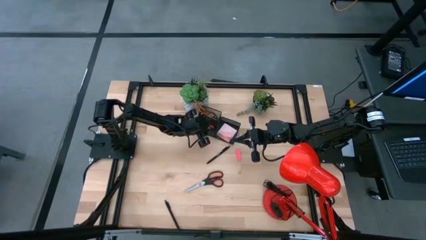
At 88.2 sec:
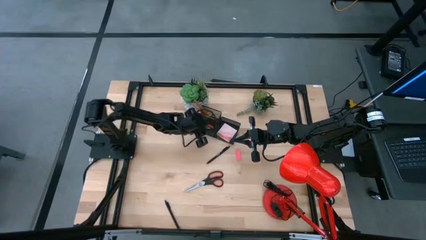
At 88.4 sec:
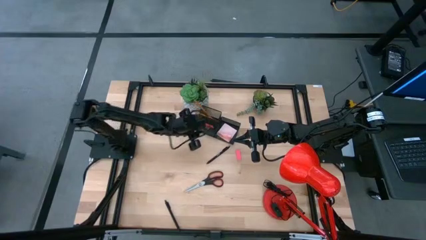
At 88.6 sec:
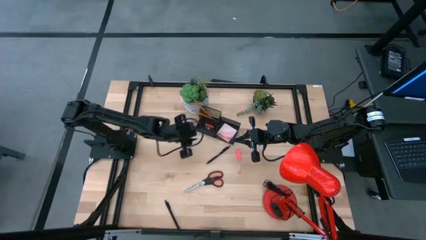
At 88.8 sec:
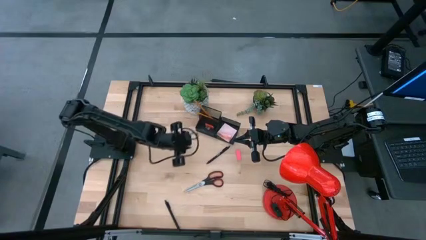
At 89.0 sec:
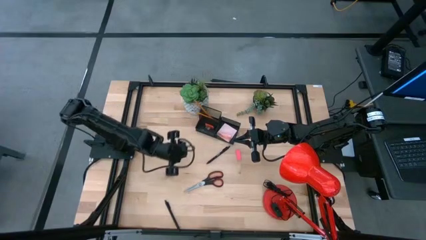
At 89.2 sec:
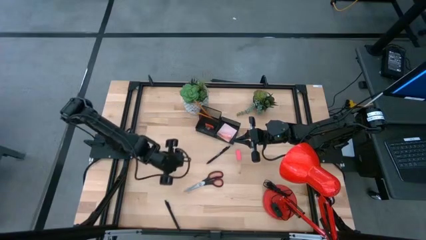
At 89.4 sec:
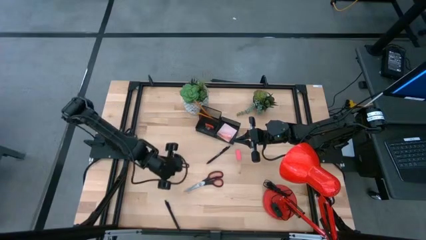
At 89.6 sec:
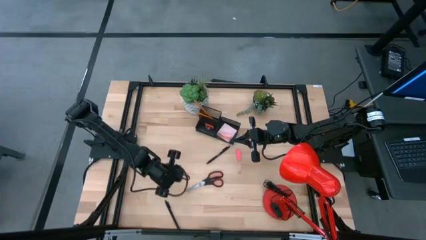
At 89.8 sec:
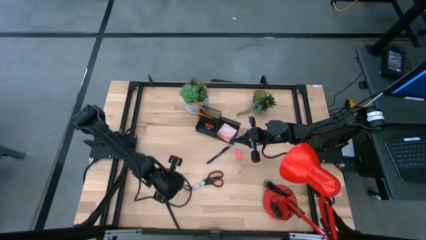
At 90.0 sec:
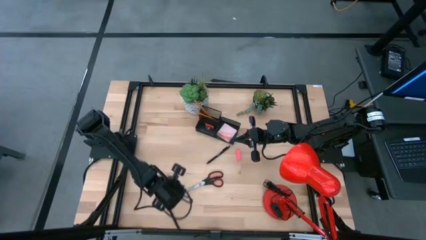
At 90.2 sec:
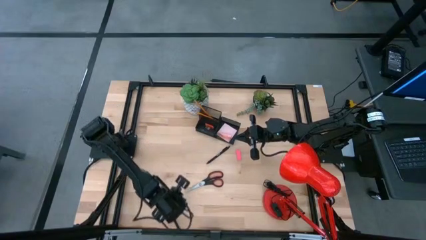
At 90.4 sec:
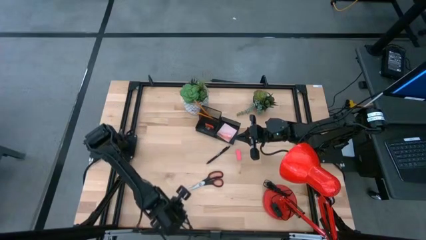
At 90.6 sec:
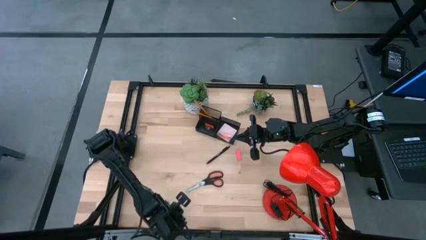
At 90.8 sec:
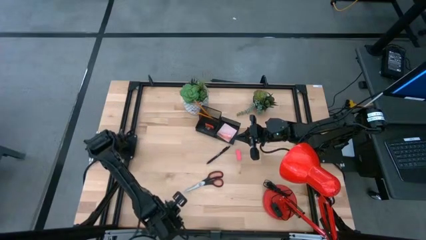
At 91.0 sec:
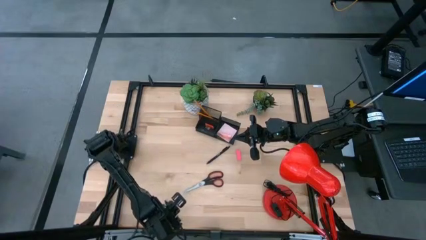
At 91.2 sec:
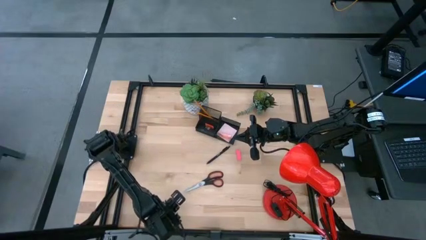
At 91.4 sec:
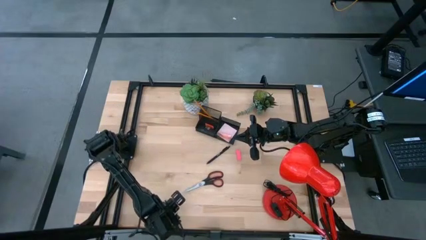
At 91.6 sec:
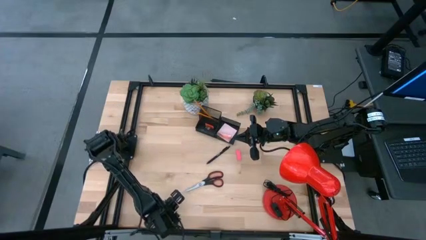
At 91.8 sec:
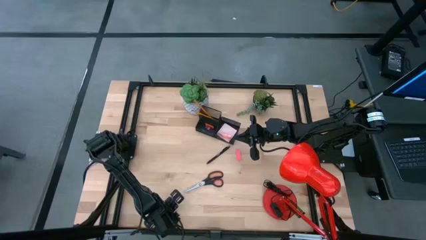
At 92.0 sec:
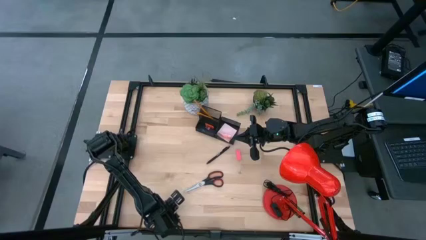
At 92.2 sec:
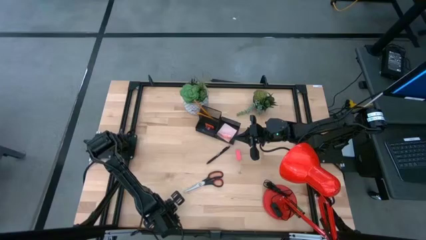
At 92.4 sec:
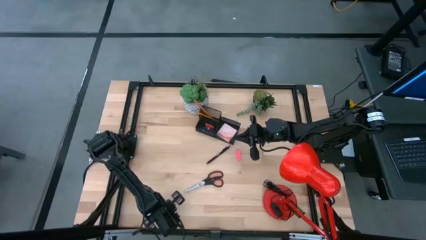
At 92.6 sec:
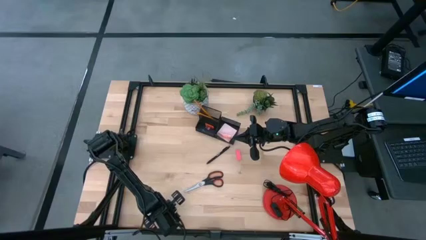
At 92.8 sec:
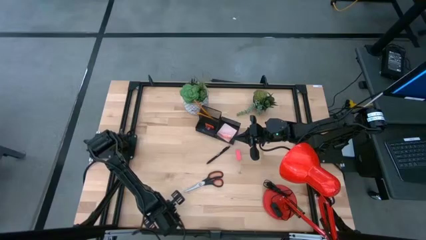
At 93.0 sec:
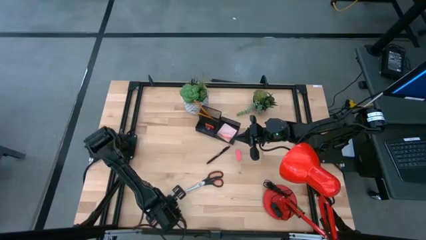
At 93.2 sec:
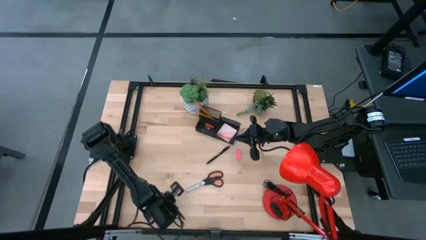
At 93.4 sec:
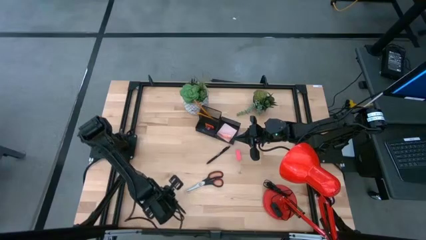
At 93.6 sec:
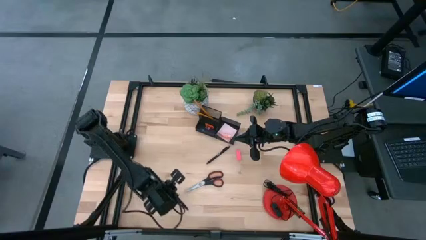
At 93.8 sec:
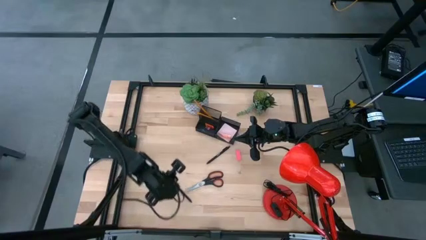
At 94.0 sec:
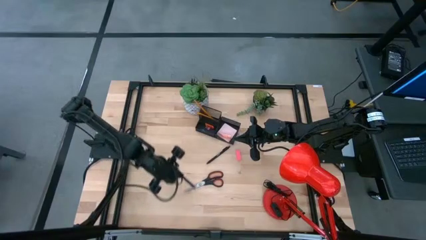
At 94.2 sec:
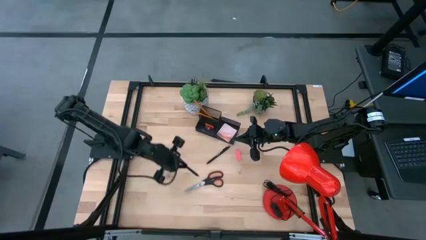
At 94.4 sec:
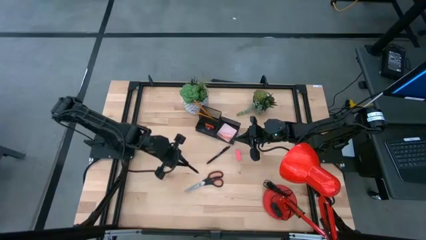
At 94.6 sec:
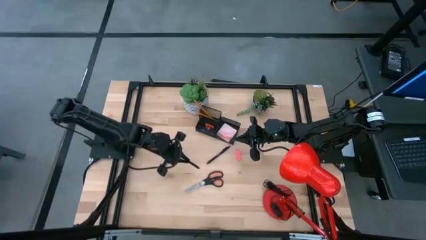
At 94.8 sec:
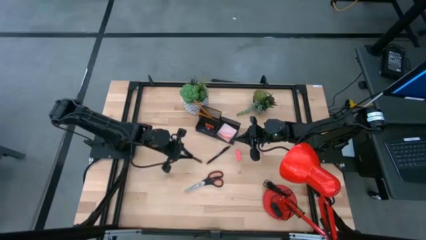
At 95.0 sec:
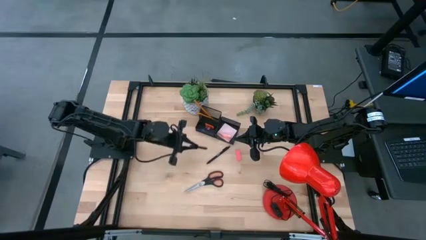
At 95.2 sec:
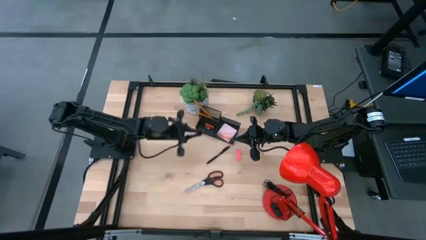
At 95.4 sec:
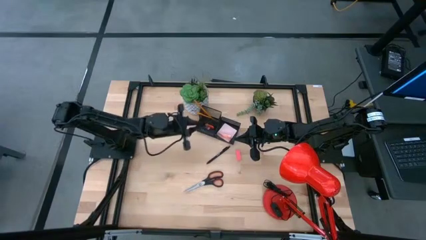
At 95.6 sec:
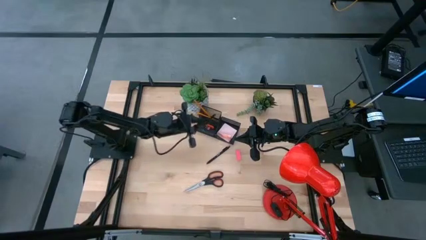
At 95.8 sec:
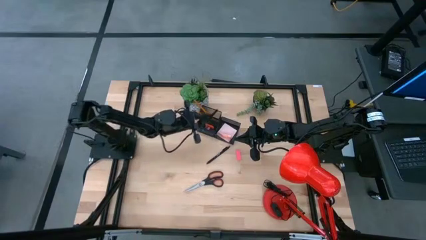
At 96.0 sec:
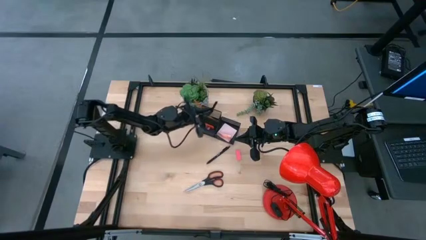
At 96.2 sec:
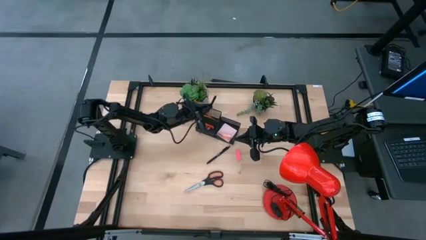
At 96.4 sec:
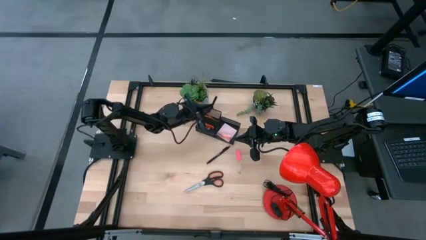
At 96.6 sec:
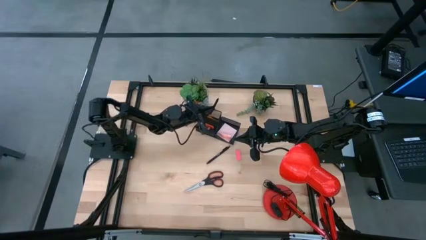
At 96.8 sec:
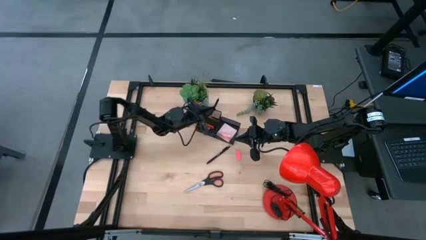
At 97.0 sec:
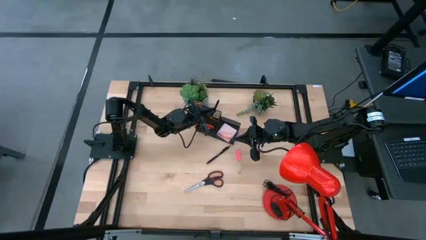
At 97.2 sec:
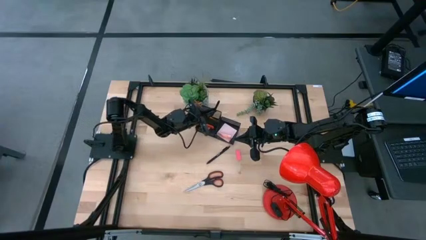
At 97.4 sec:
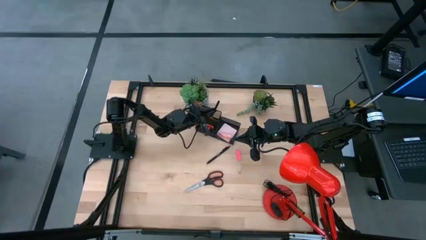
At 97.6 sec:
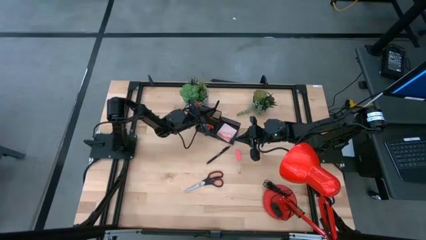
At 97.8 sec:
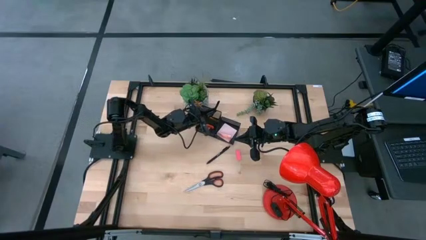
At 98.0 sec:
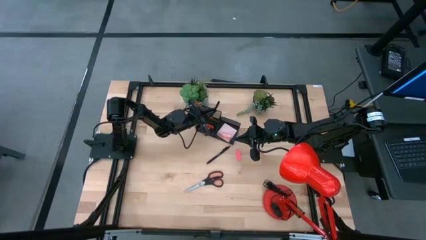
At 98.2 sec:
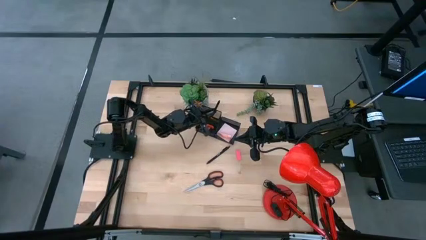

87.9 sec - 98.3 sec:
Task: Pick and place office supplies into organizer
Put the bottom black pen into the black desk organizer

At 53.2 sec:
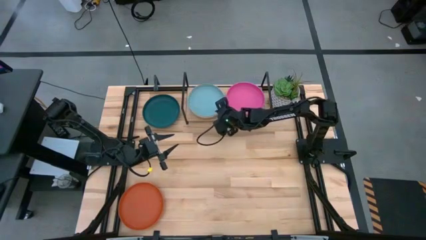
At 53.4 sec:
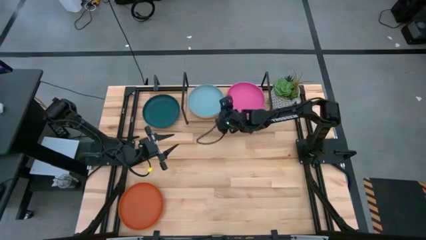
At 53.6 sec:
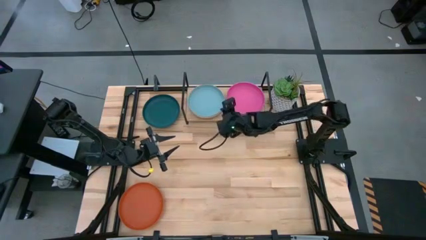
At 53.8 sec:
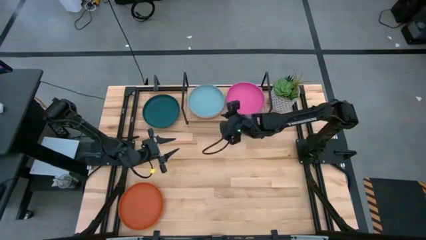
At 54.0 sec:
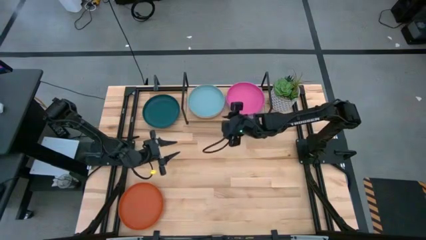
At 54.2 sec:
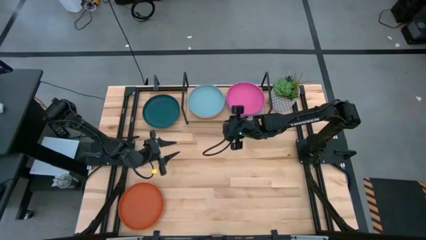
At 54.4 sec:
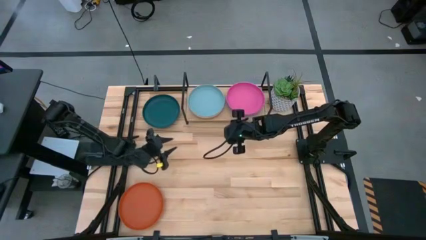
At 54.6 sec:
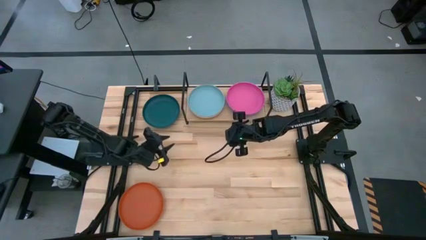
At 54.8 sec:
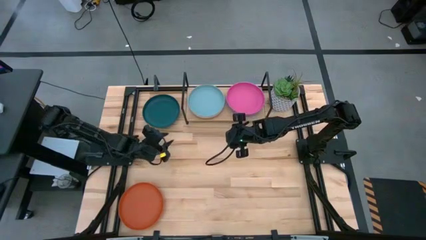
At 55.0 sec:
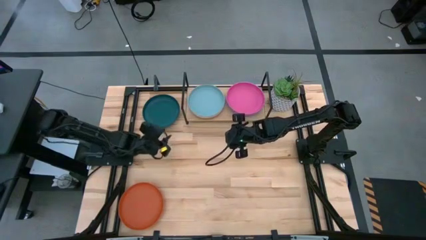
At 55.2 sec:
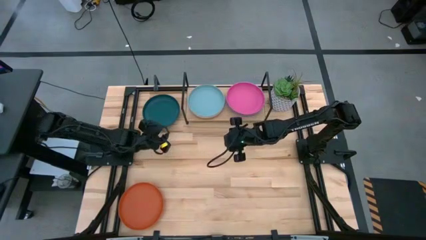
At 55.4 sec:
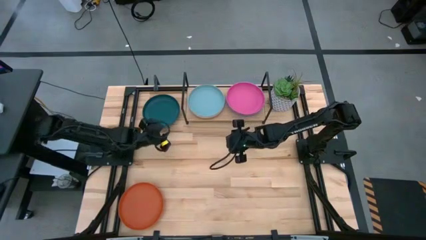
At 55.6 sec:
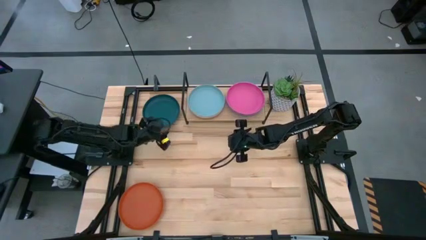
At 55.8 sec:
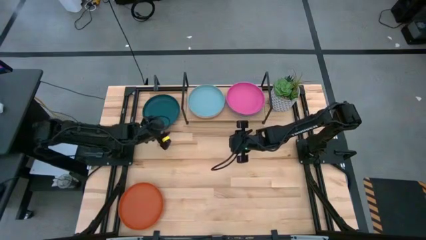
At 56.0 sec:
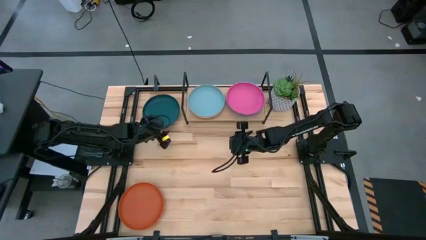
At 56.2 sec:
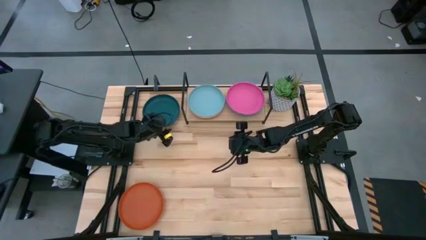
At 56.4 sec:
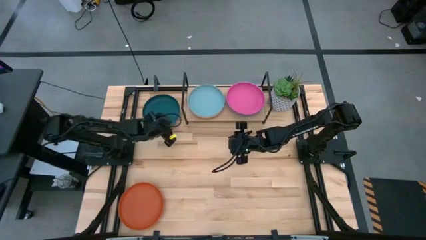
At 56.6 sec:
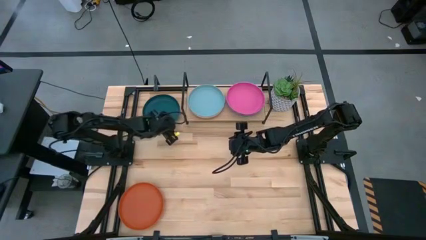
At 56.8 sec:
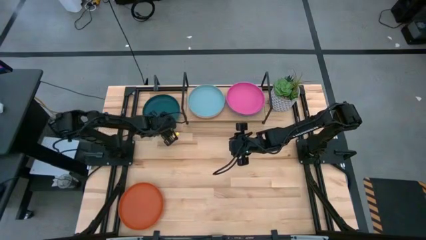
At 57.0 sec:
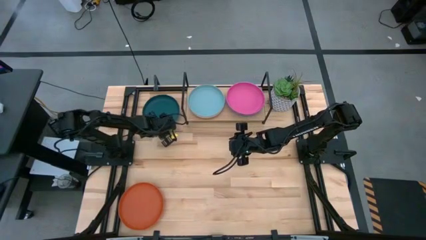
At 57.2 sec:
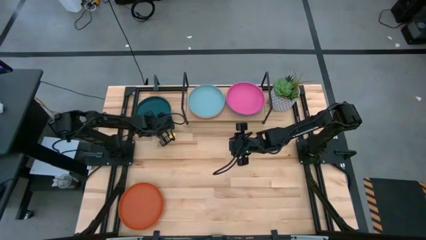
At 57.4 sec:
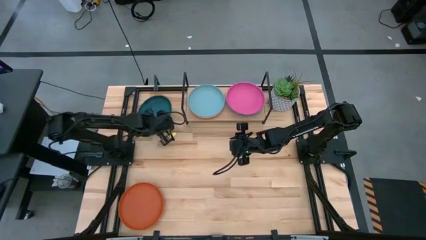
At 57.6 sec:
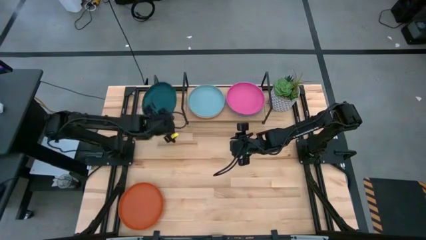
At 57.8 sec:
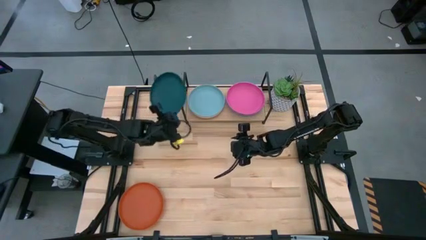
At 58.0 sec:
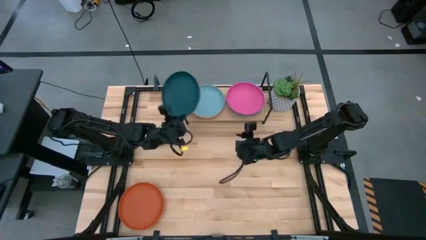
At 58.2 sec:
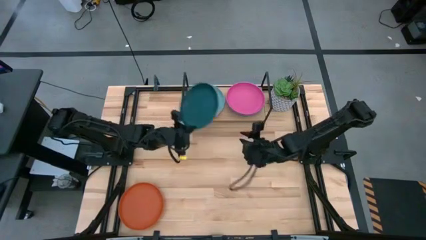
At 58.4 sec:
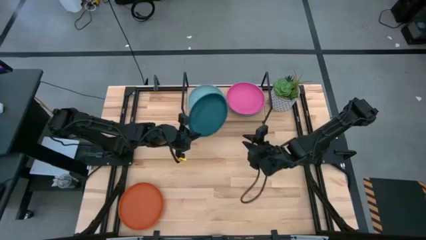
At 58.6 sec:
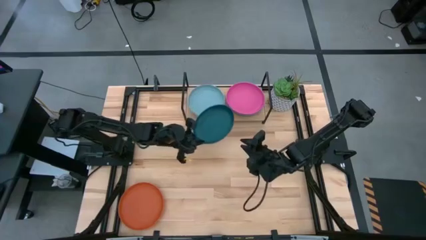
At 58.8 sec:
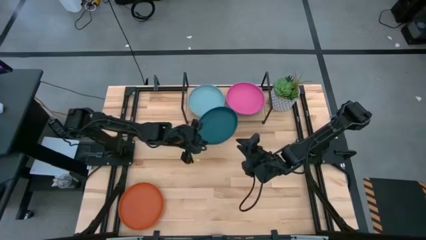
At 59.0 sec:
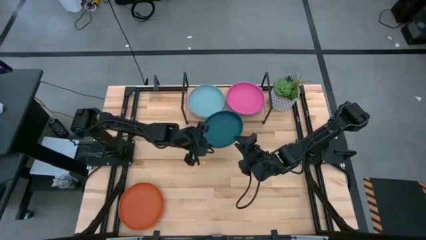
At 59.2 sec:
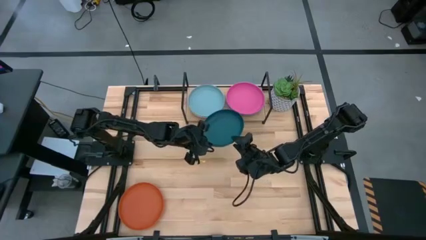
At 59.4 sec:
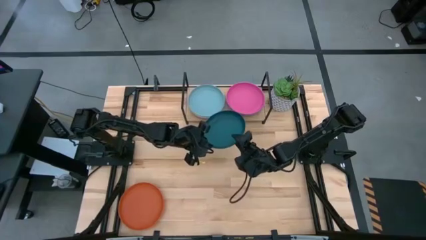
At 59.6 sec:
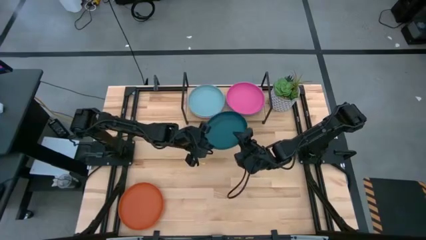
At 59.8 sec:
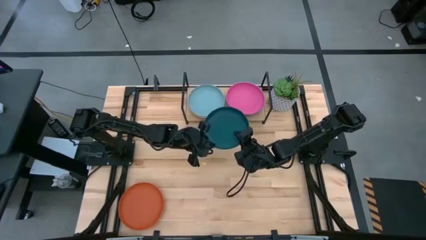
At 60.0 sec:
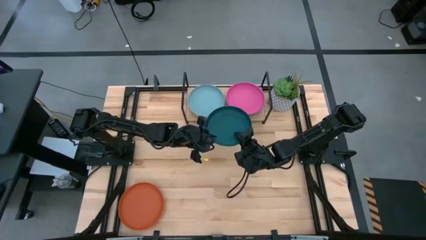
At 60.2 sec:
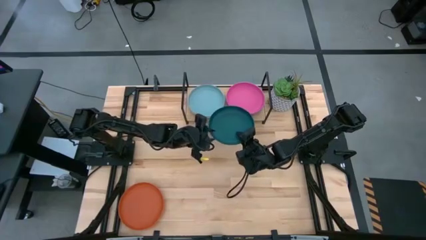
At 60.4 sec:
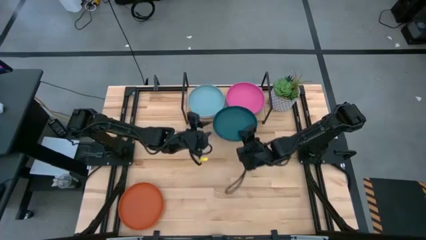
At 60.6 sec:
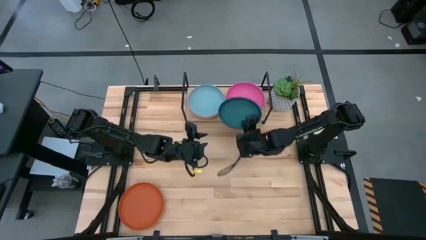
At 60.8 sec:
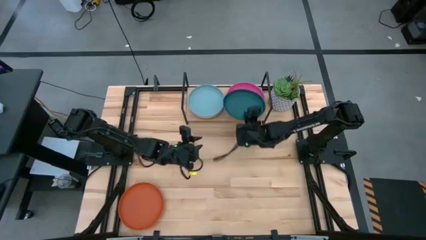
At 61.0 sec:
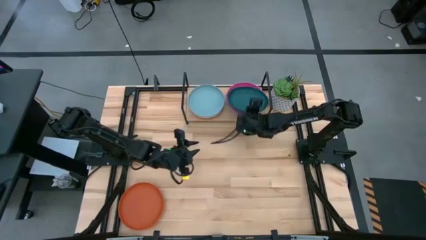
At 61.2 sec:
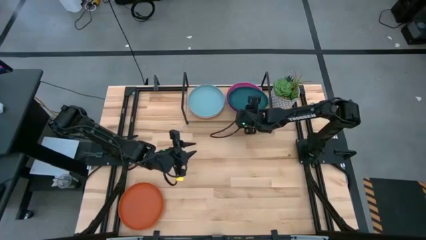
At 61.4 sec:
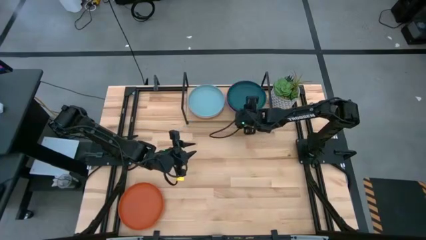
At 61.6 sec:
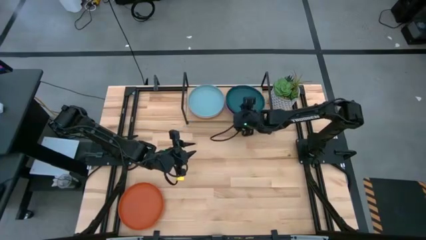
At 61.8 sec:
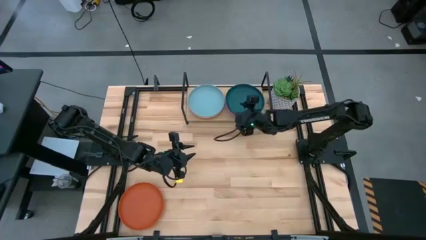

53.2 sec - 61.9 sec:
Task: Place and stack plates onto a shelf
Stack the dark blue plate on top of the pink plate on the shelf
